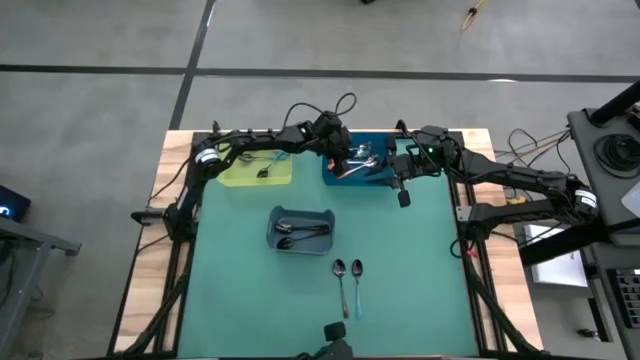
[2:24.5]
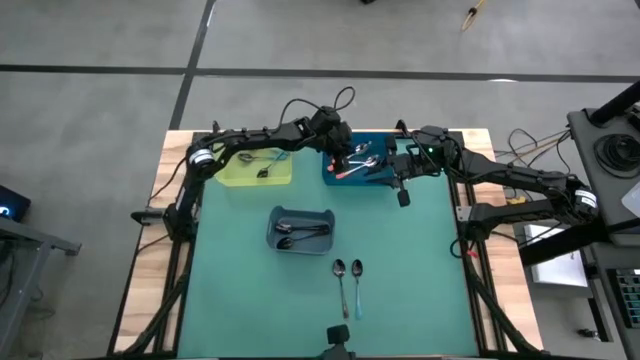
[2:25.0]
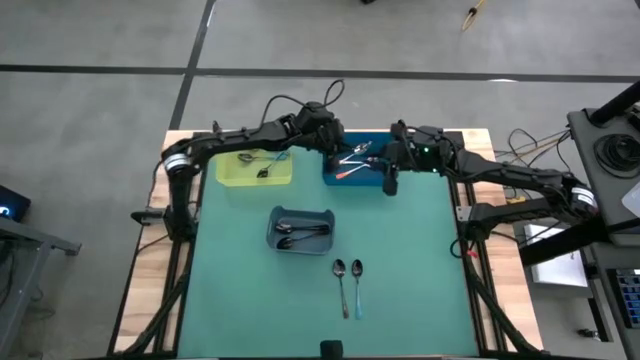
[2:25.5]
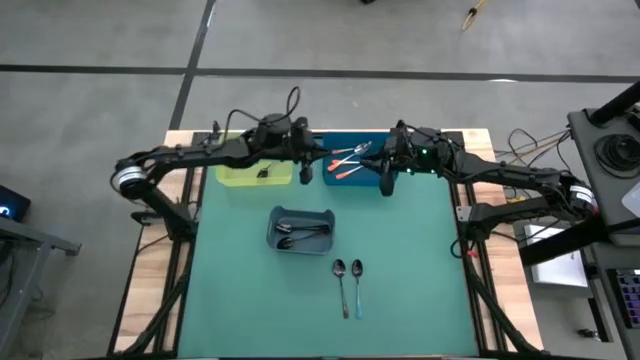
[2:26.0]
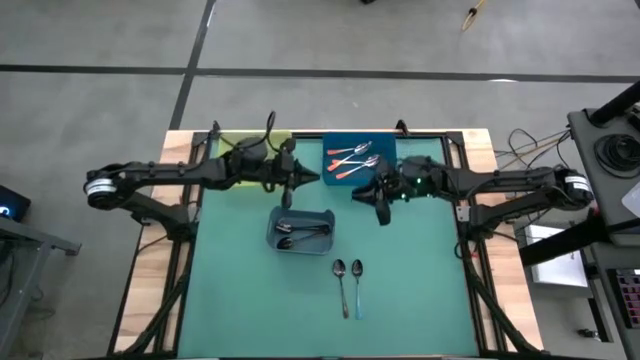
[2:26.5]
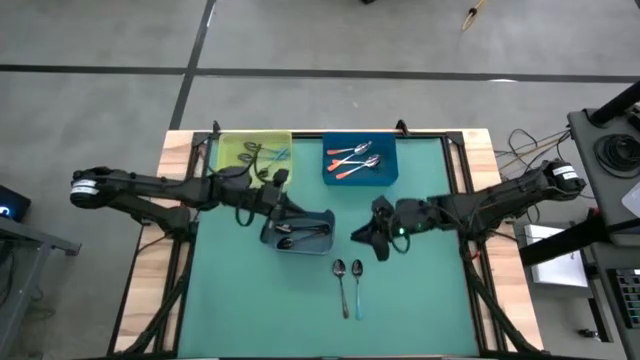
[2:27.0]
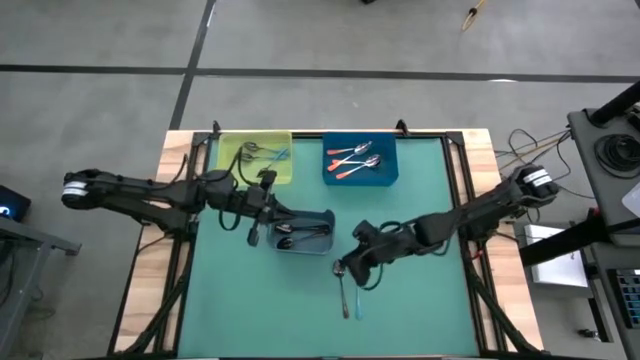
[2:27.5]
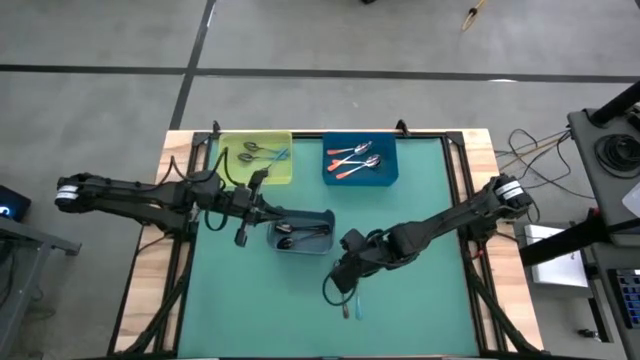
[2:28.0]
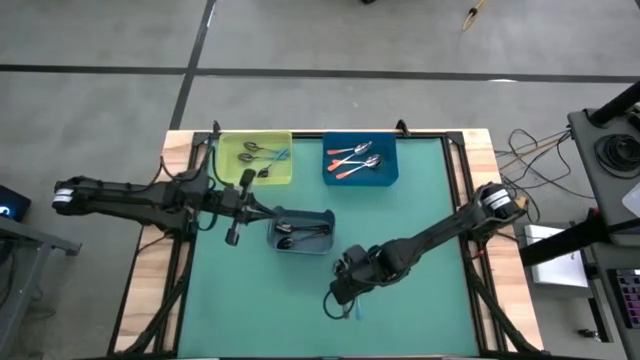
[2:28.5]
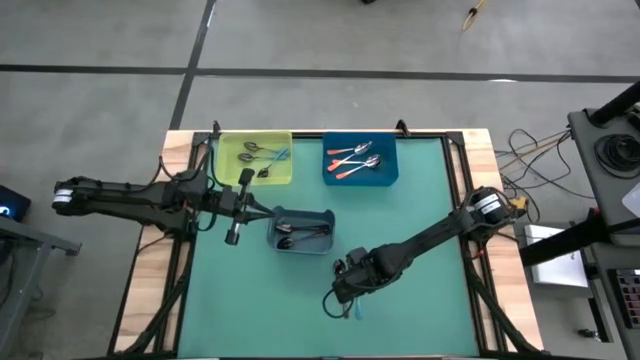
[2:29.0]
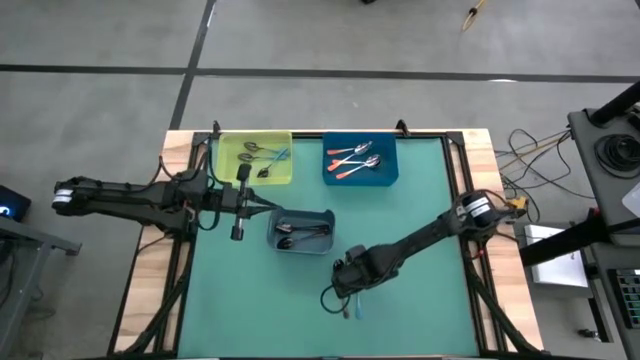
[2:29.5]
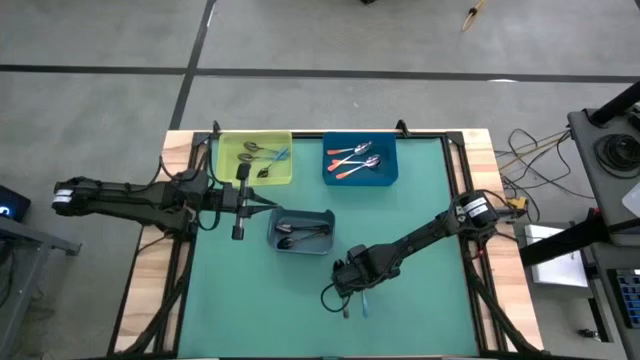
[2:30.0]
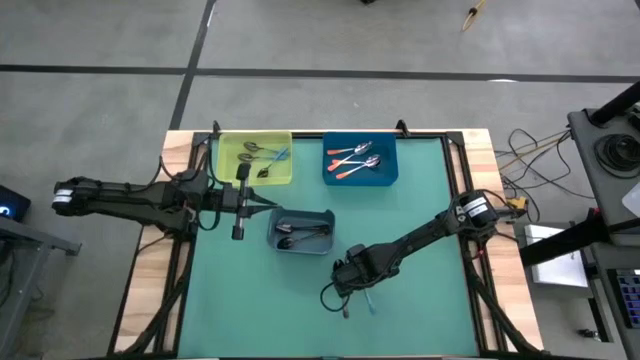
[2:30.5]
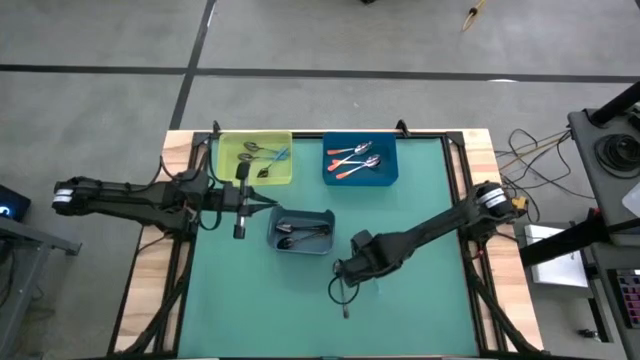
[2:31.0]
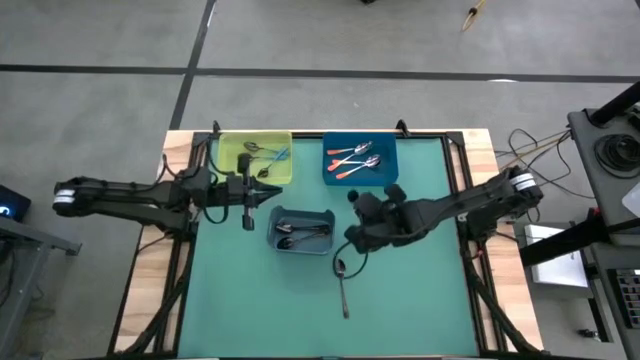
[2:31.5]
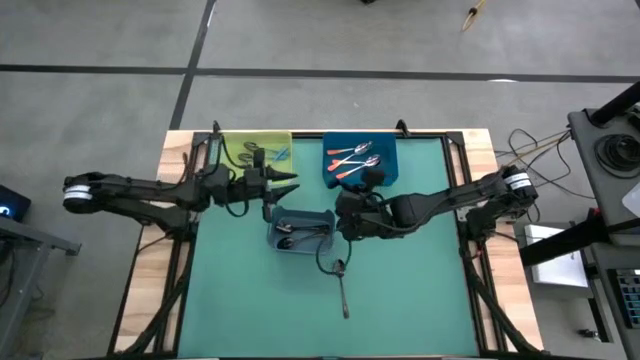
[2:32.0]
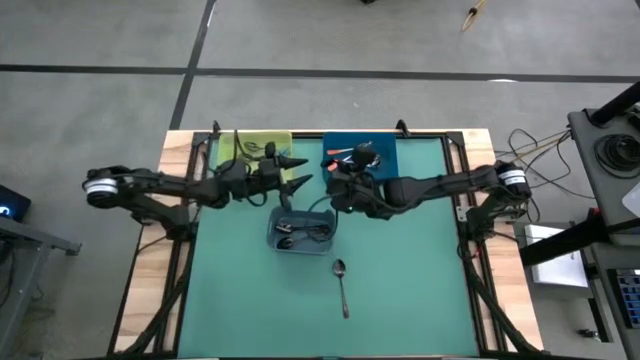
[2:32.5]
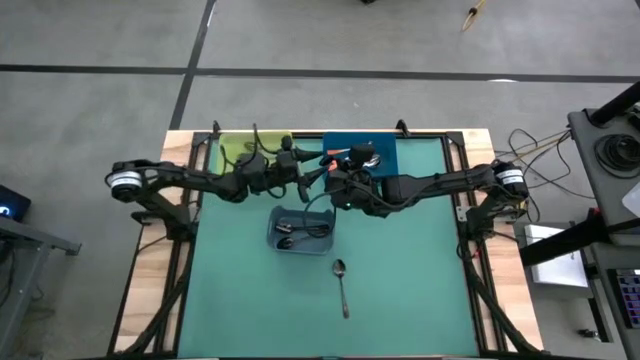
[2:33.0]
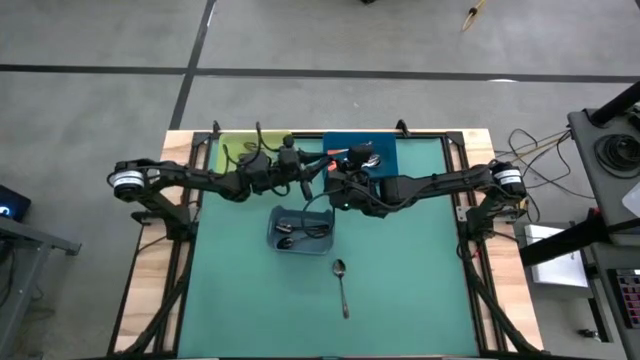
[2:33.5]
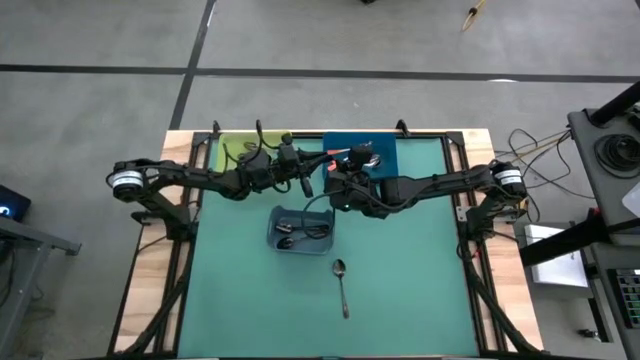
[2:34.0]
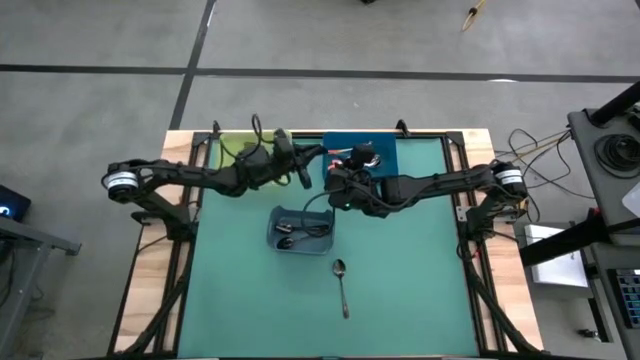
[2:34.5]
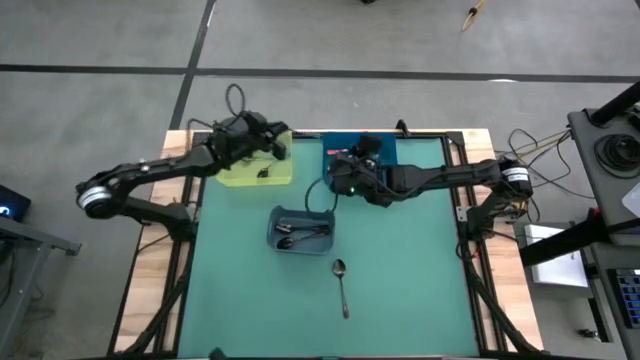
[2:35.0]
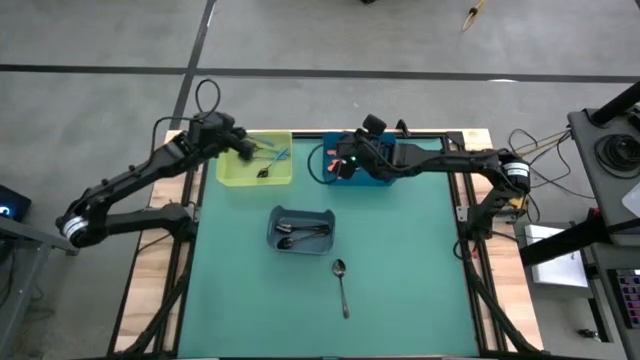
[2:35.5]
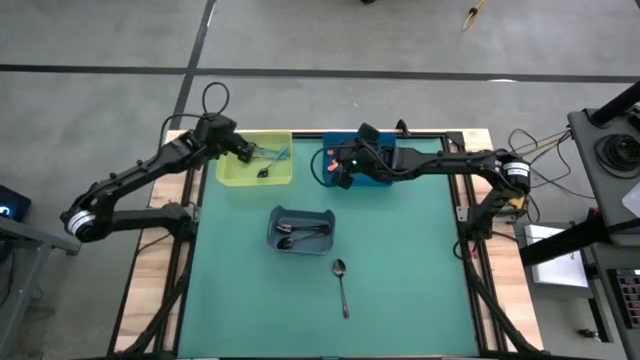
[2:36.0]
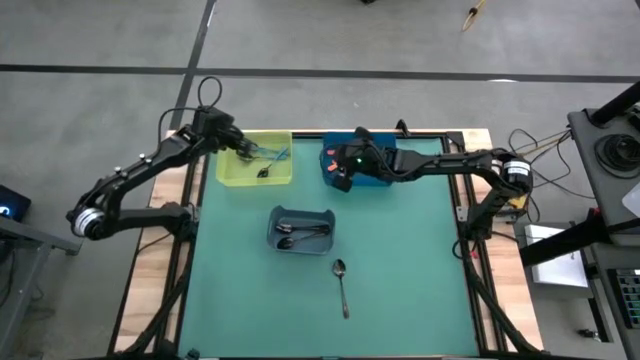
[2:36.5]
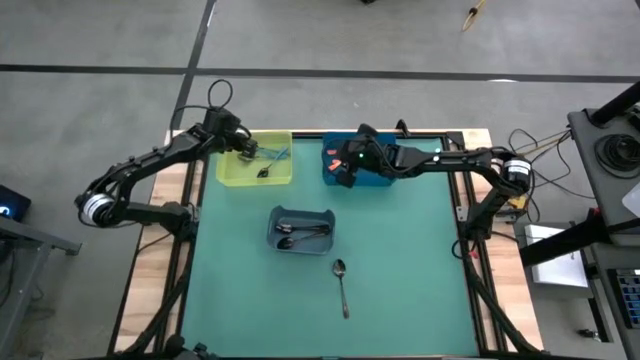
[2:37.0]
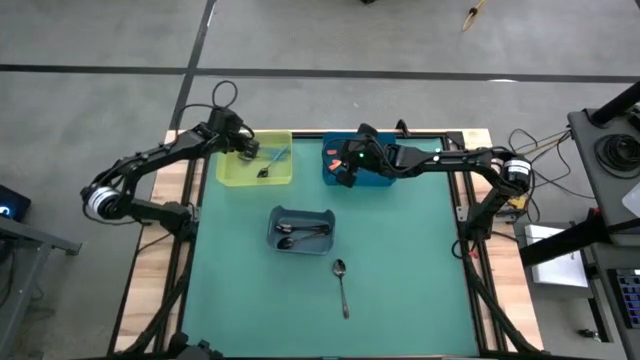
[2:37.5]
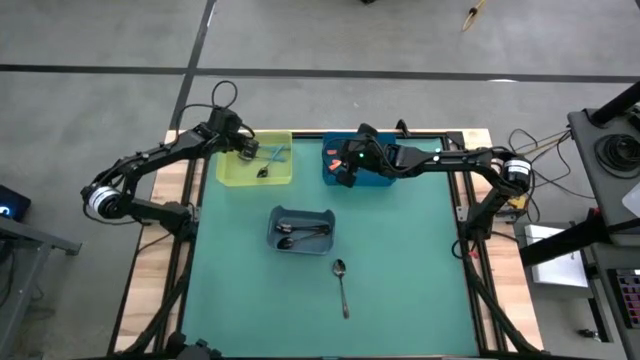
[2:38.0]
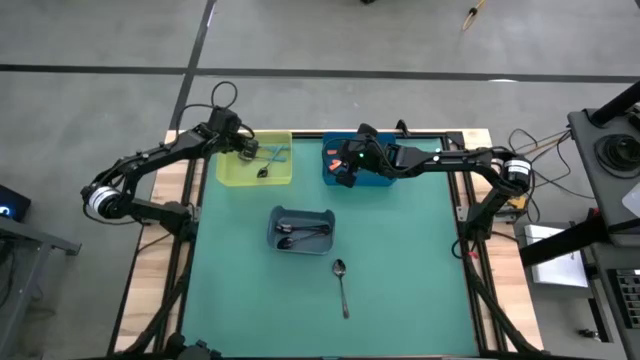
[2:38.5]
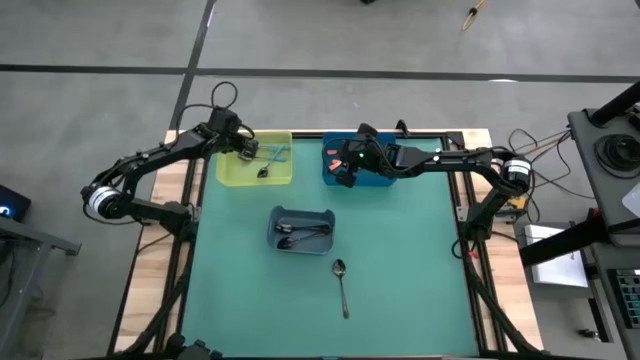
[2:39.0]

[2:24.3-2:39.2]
Task: Sort silverware by color (type)
Put the blue spoon into the green bin

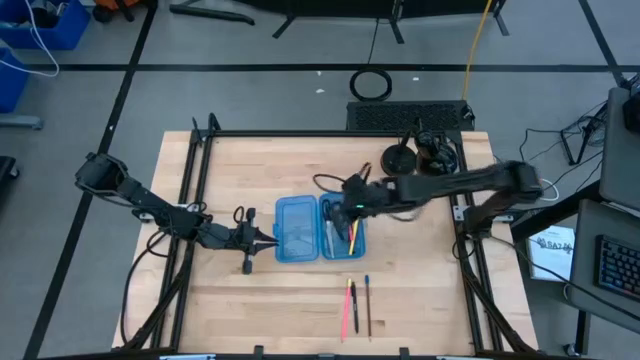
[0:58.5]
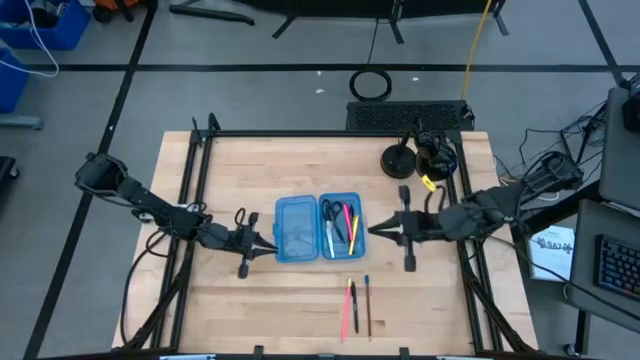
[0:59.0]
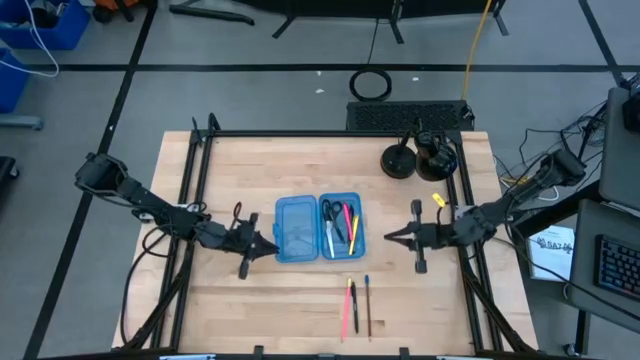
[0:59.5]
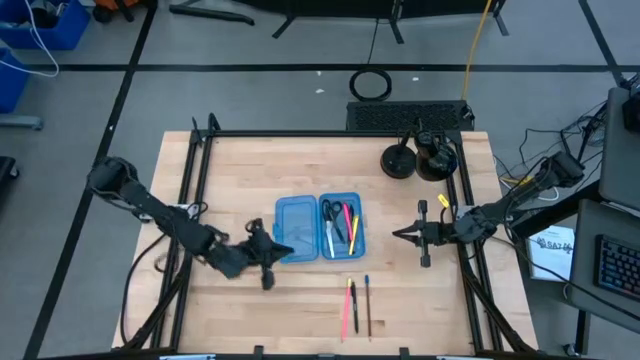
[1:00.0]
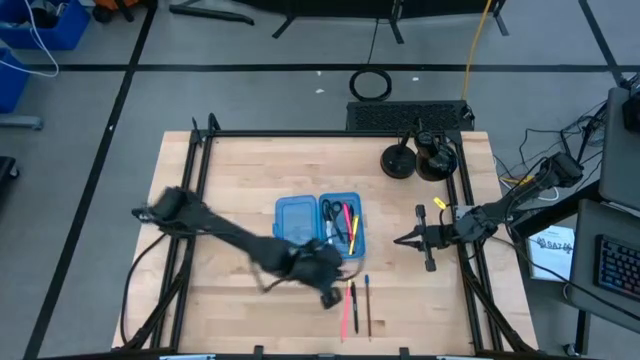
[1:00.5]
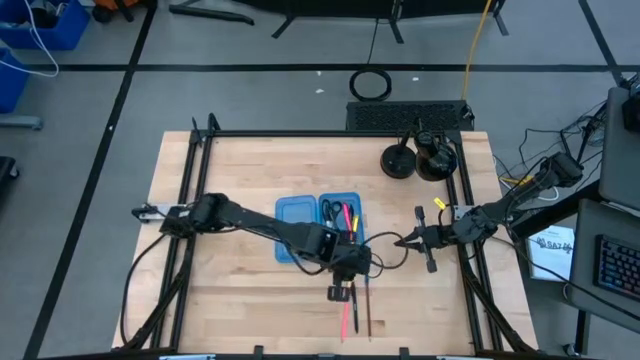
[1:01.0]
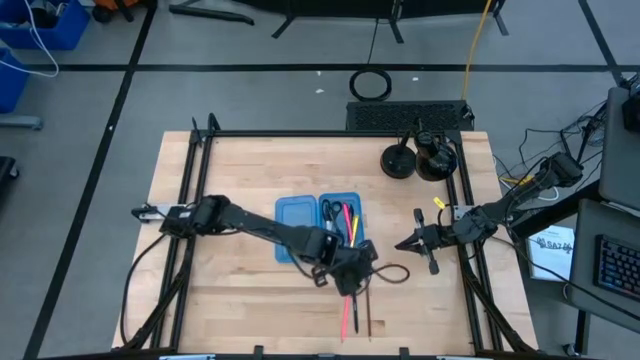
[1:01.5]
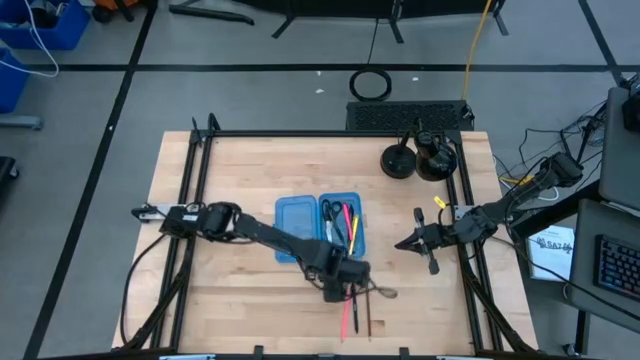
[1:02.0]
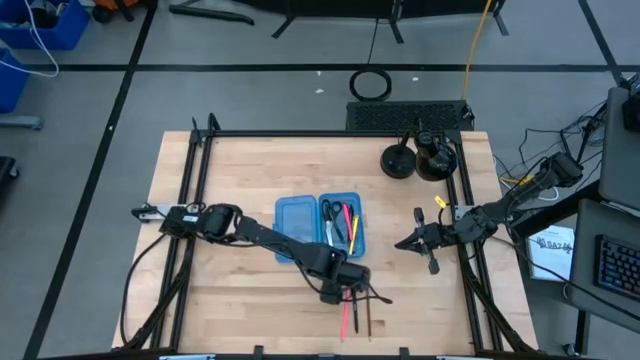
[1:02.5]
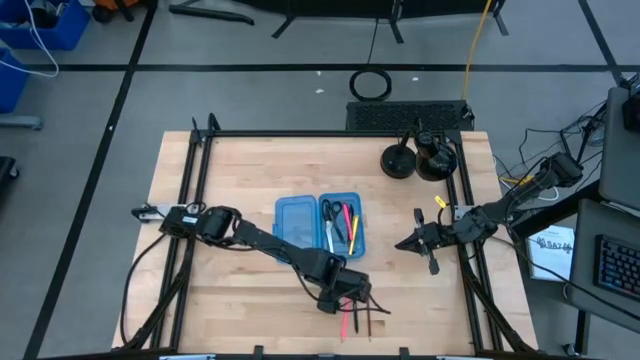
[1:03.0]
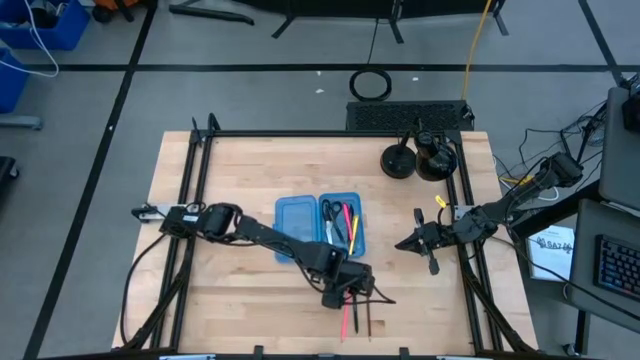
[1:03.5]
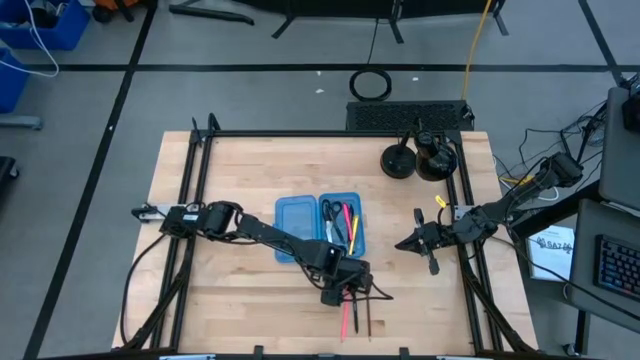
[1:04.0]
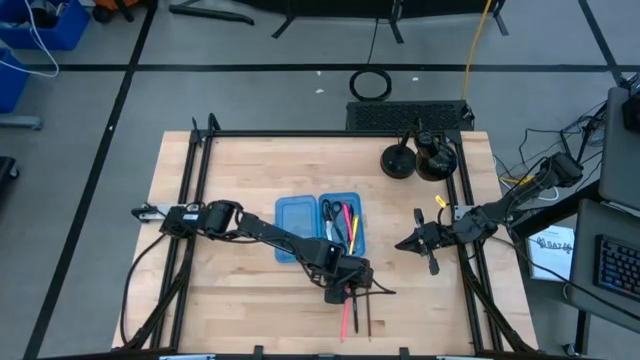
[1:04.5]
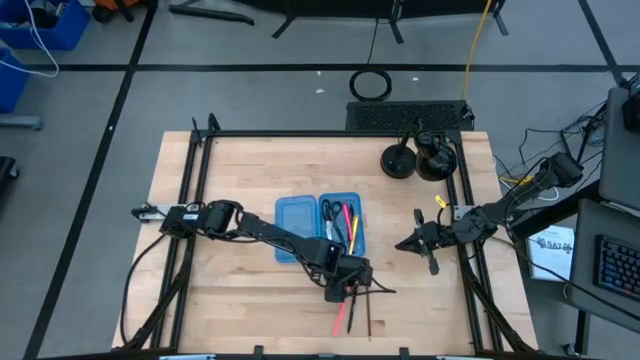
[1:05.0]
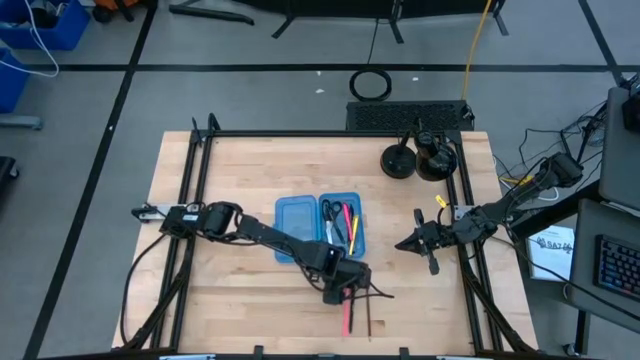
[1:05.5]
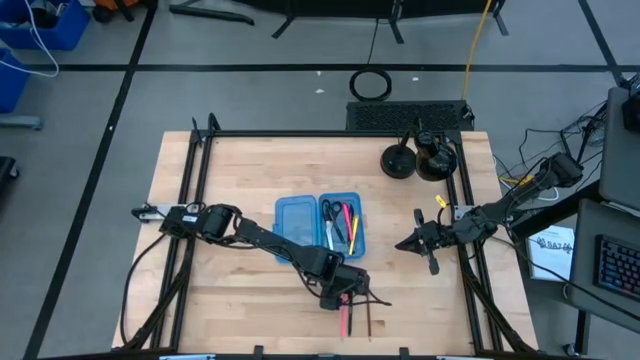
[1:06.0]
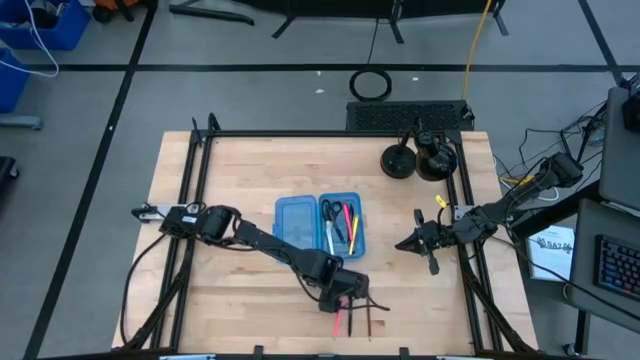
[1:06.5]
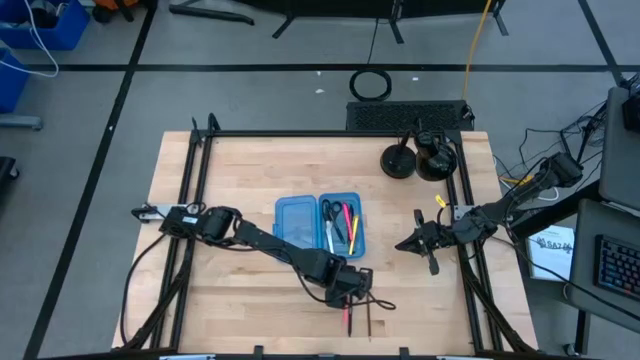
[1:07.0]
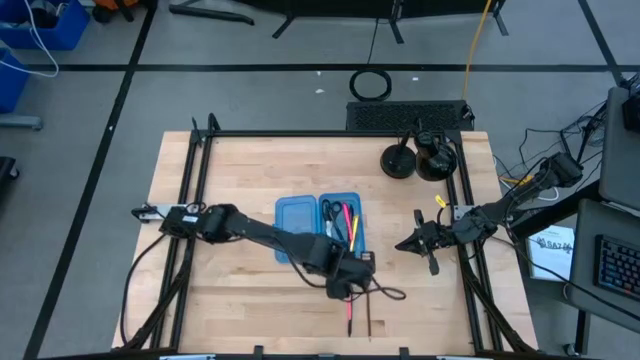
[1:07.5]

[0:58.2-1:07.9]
Task: Pick & place school supplies into a supply box
Put the pink pencil into the blue supply box
